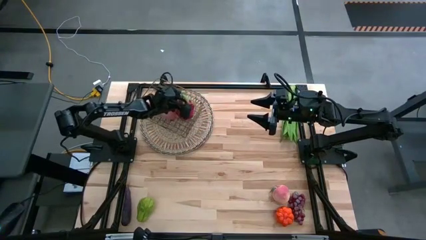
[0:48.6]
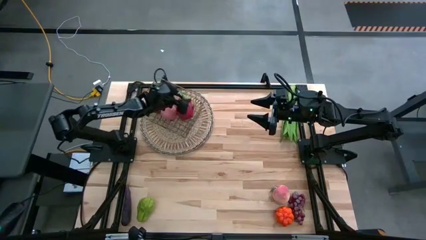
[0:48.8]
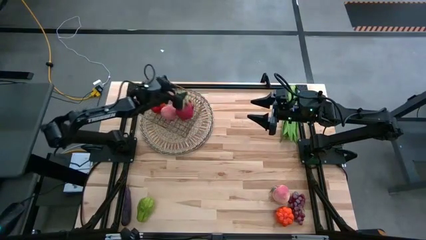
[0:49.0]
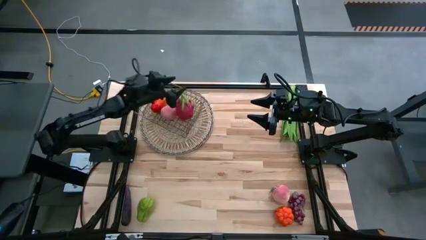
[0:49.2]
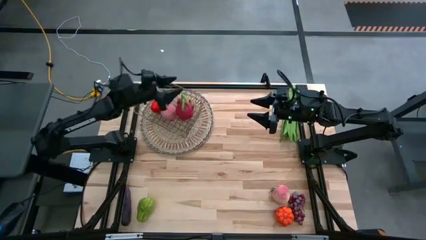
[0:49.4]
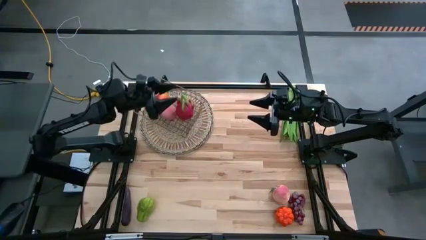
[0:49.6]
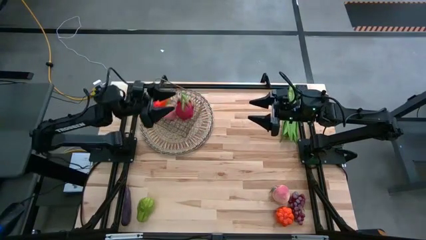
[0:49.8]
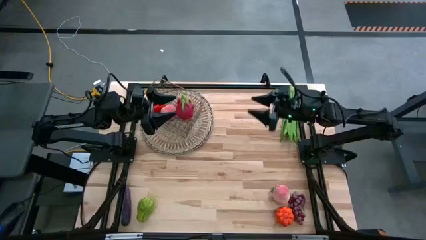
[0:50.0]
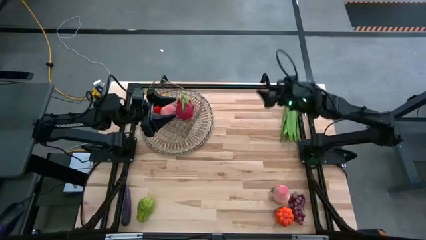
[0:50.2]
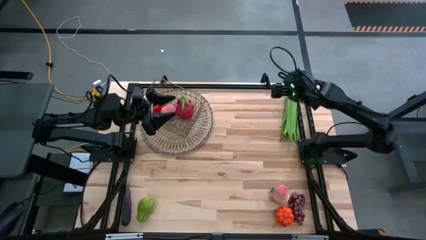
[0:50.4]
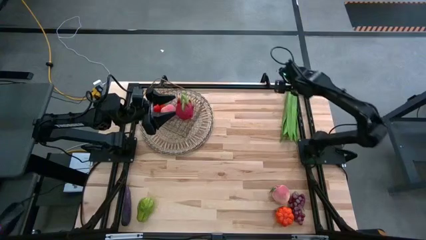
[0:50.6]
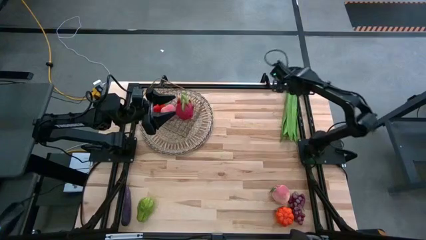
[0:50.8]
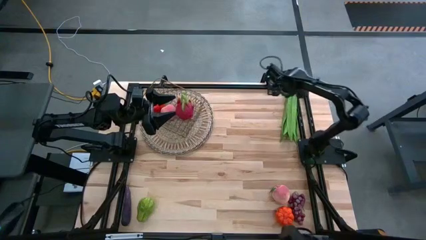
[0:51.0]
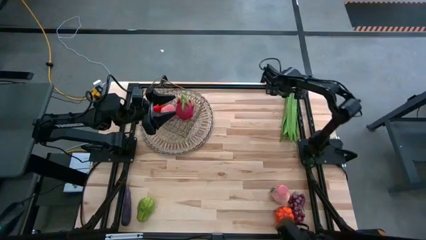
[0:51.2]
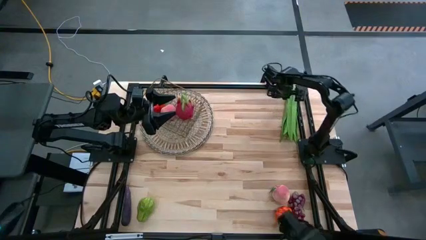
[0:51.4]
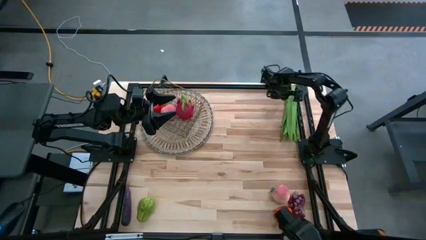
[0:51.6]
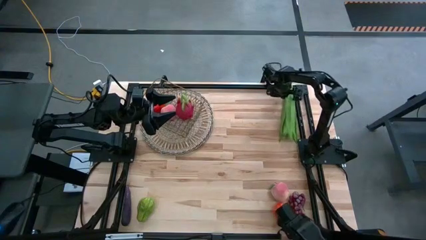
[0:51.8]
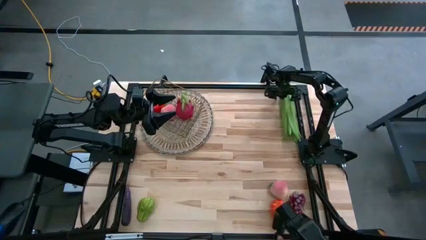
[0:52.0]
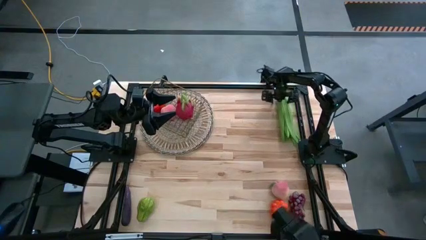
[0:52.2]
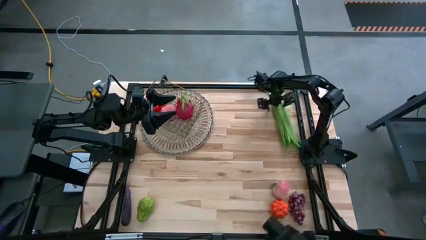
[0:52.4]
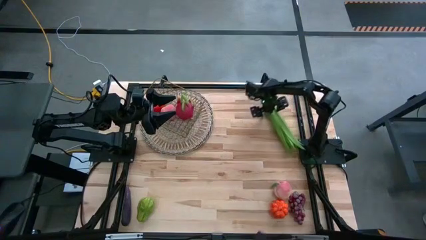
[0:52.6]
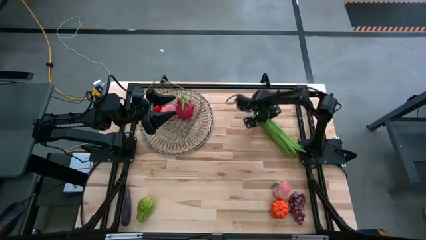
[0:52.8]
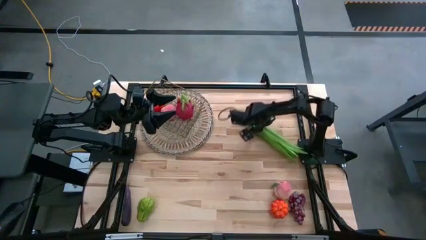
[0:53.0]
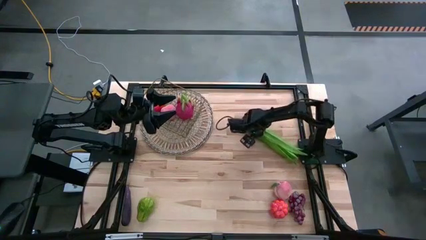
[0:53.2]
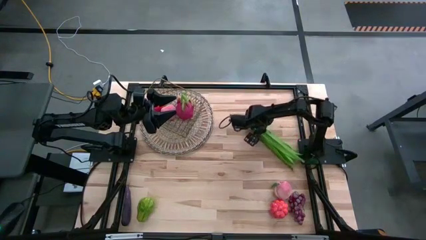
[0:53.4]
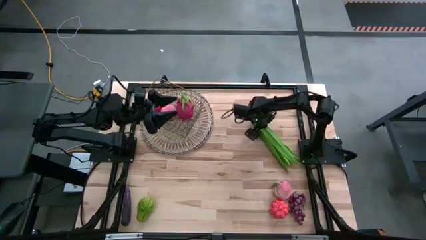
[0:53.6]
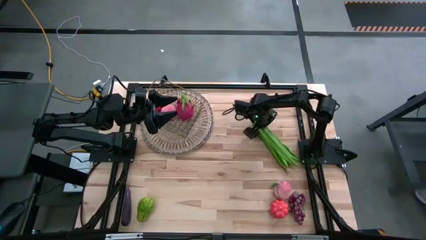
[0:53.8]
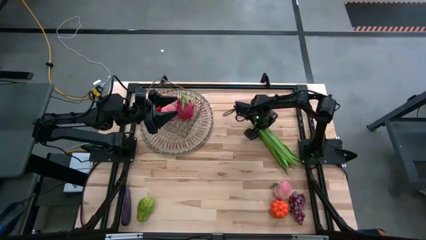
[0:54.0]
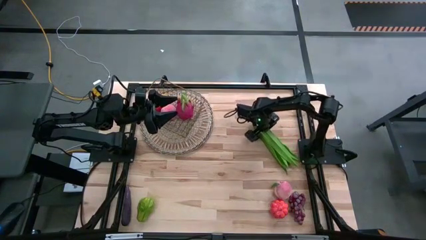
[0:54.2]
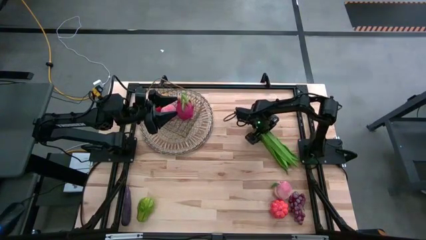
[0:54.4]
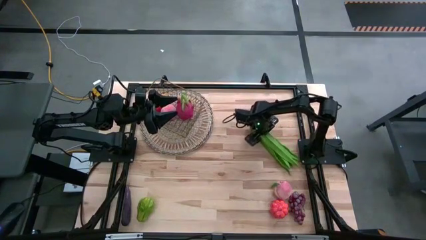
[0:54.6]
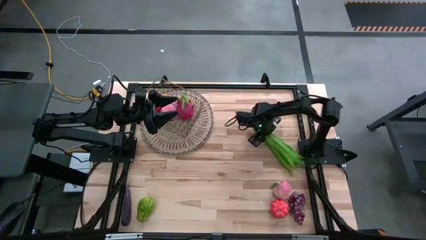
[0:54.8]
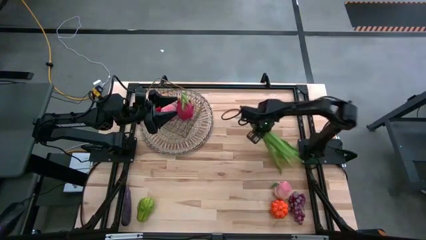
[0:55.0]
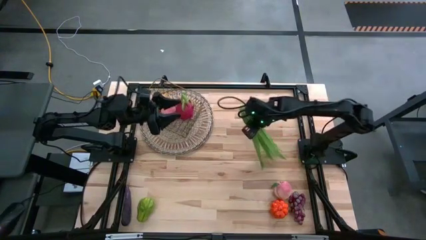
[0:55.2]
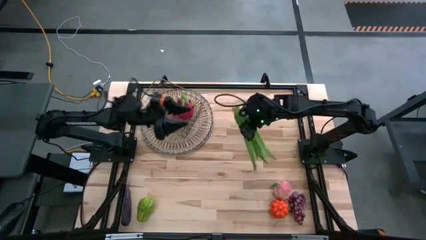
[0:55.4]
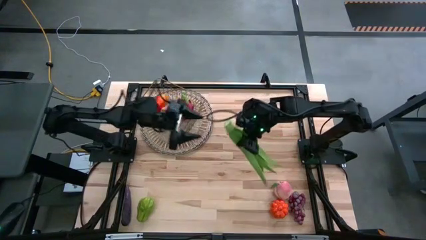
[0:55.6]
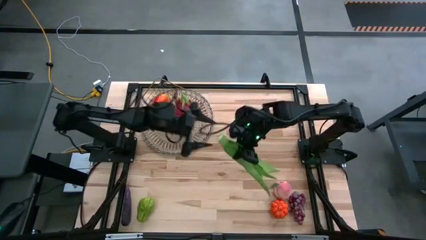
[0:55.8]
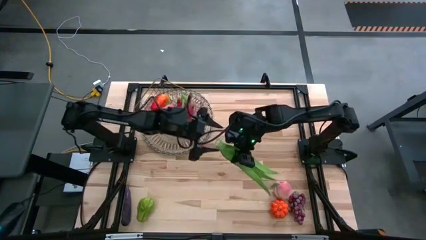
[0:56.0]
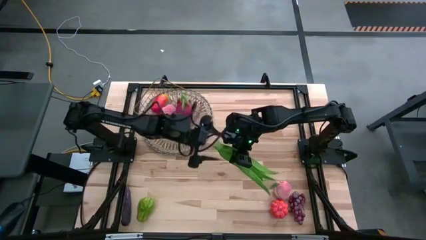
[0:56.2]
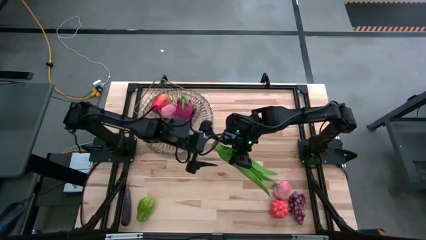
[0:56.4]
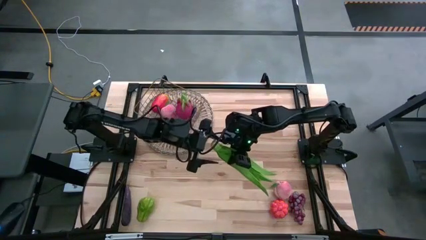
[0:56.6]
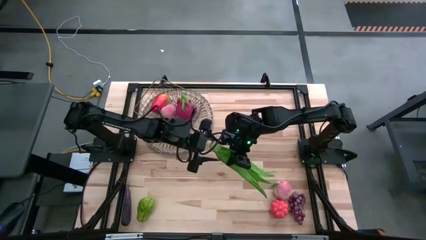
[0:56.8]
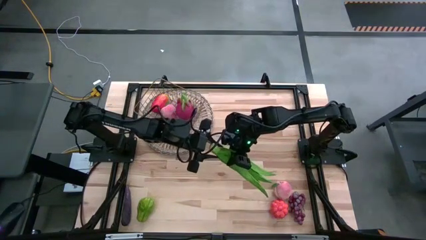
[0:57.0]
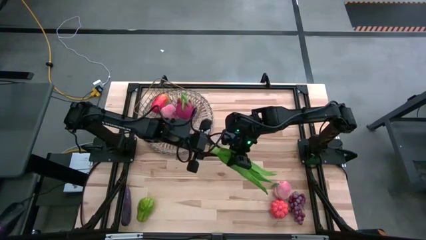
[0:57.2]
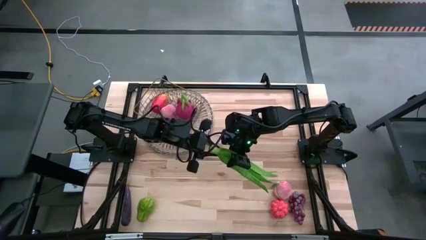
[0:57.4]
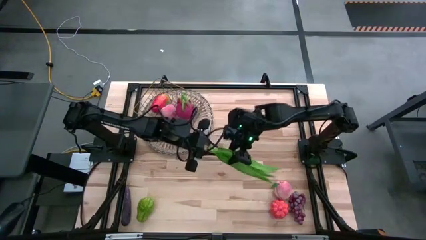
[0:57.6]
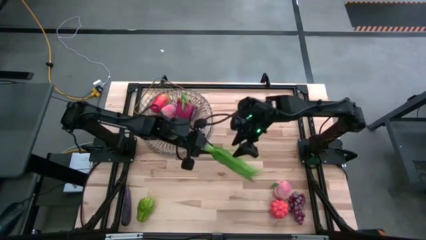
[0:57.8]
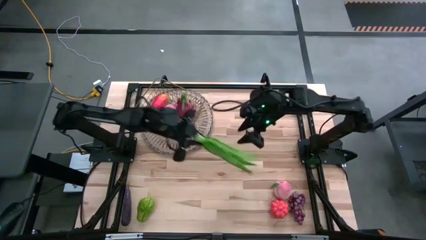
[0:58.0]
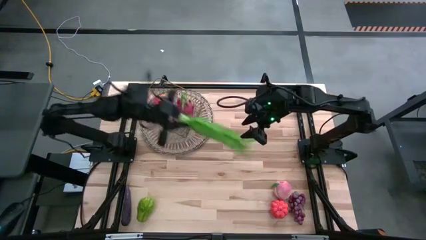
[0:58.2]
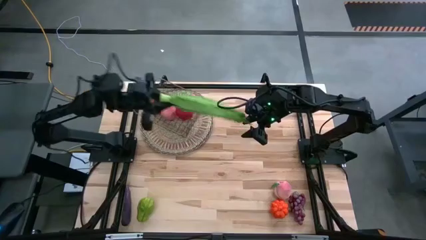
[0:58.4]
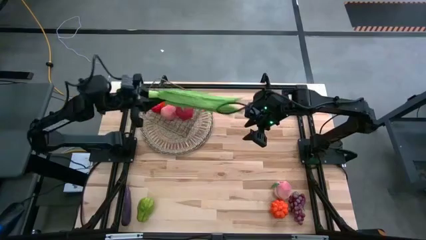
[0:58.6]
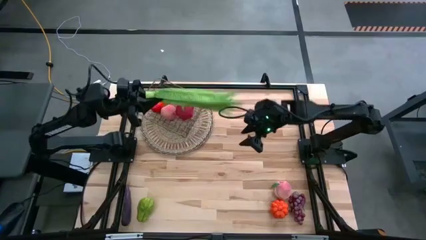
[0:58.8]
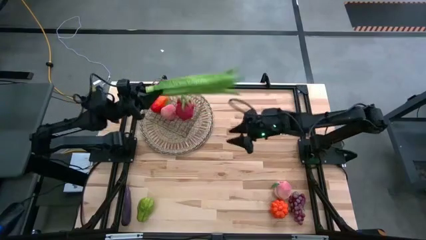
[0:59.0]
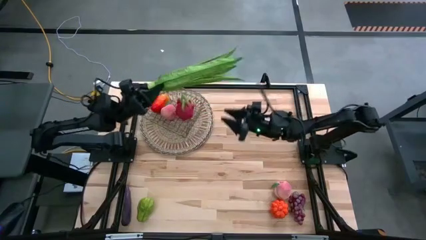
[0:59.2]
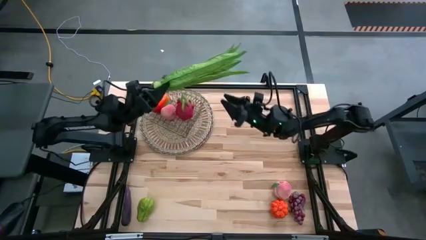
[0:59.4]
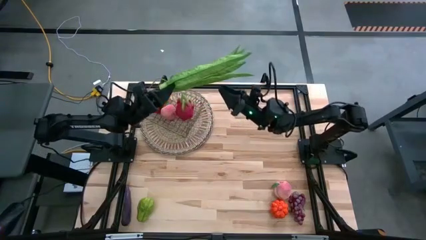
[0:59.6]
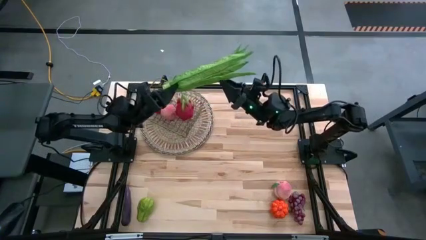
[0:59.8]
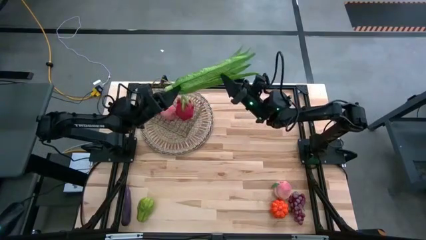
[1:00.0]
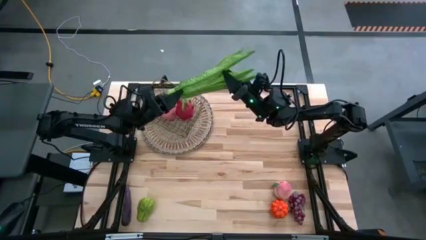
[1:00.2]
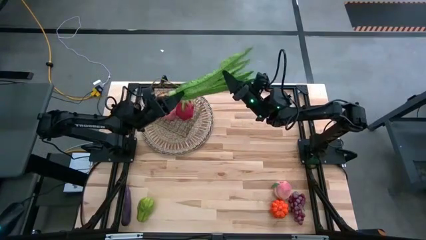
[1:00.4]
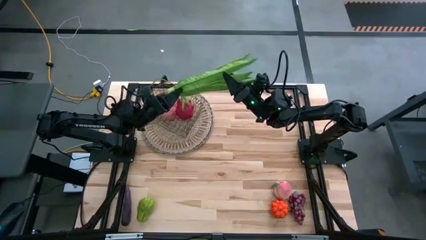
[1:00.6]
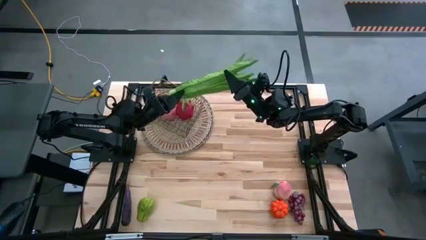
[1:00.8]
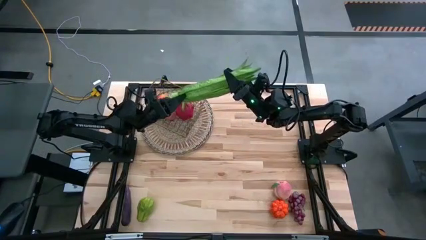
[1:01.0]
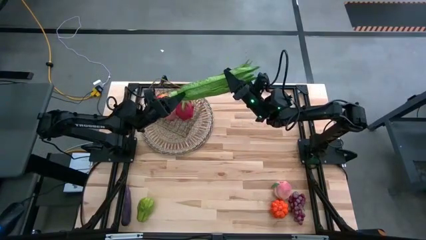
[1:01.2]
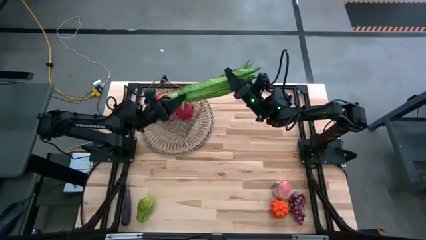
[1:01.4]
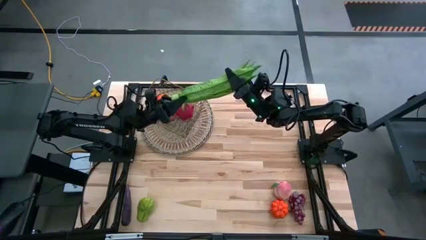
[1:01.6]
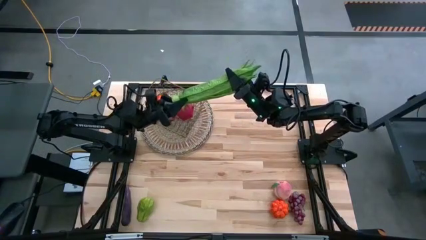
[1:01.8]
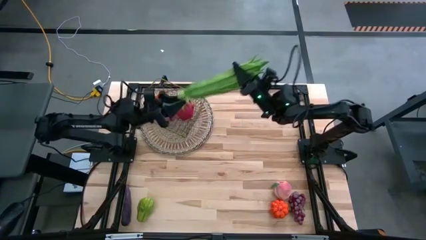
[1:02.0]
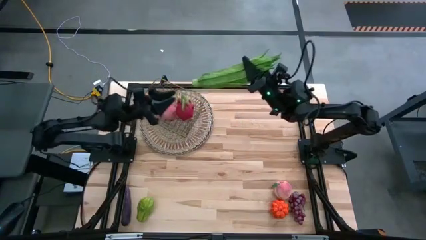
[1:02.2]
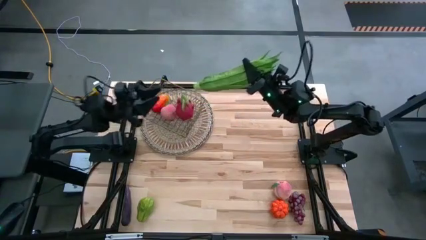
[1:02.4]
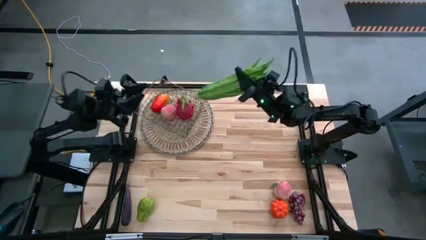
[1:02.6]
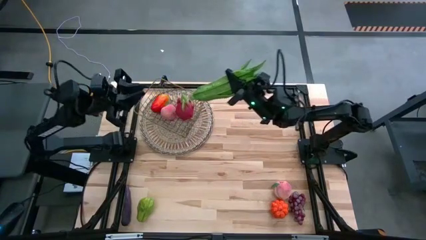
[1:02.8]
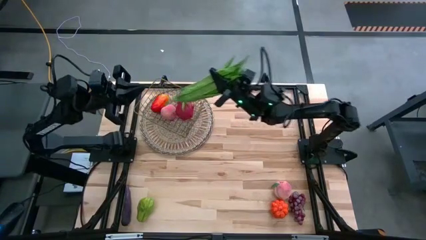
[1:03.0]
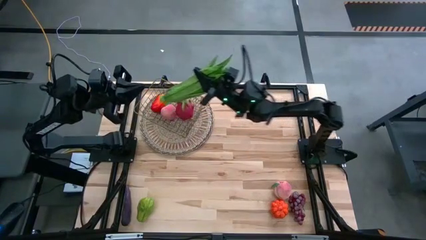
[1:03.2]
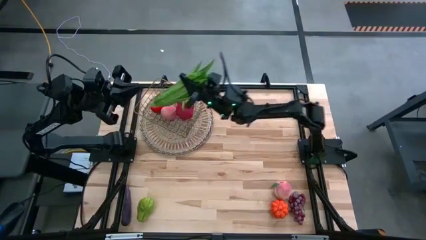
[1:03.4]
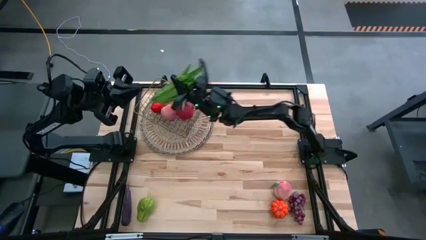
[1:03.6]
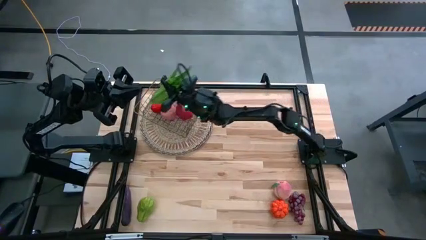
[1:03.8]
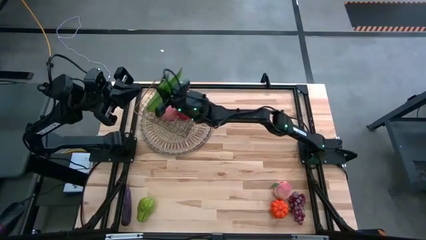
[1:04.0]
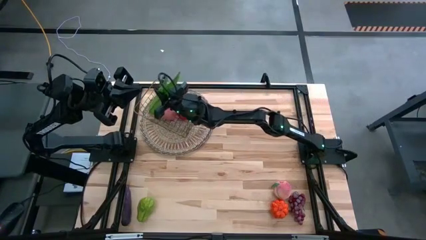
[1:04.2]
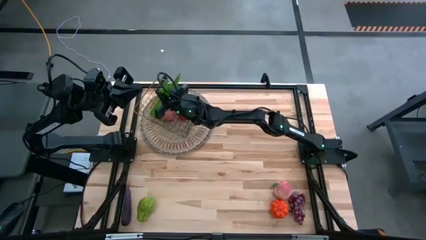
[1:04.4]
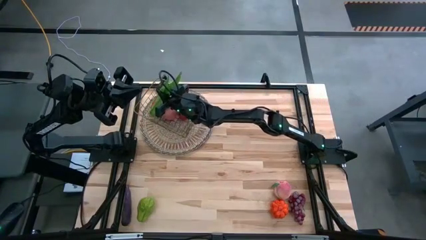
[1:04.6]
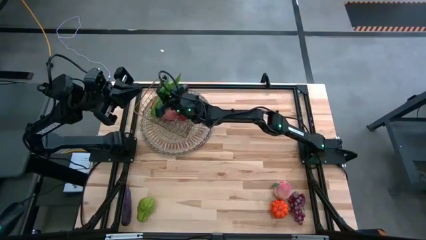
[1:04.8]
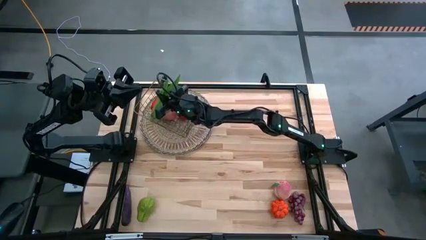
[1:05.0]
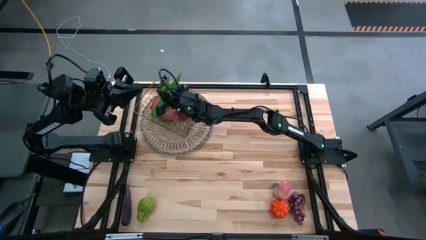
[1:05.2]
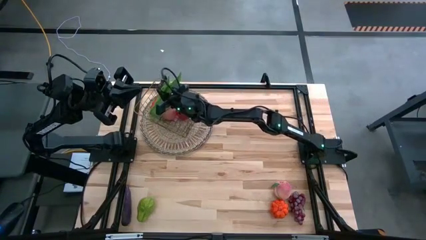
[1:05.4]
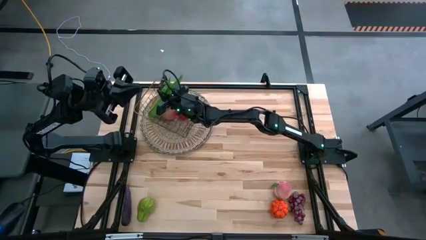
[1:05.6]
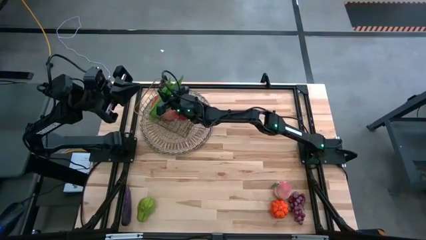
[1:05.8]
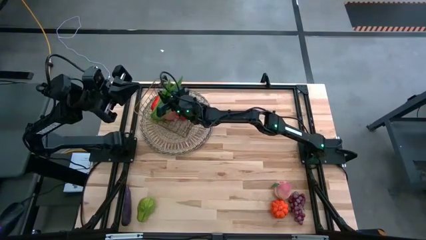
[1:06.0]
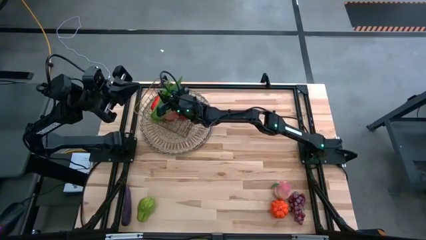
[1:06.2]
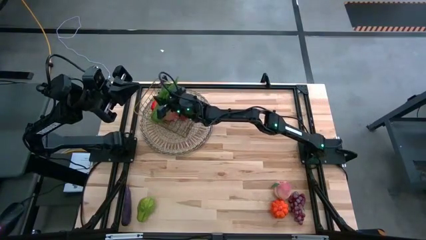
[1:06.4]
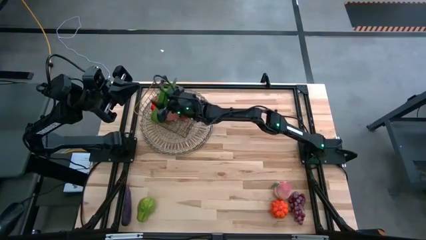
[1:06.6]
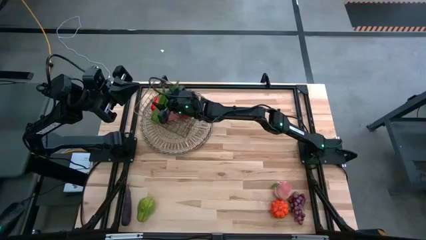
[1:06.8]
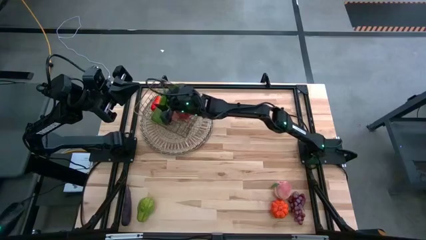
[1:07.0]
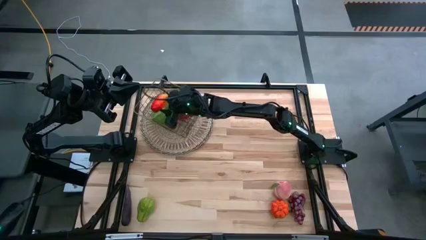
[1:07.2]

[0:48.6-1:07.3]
Task: Build produce basket
Put the leaf lettuce into the wire basket
